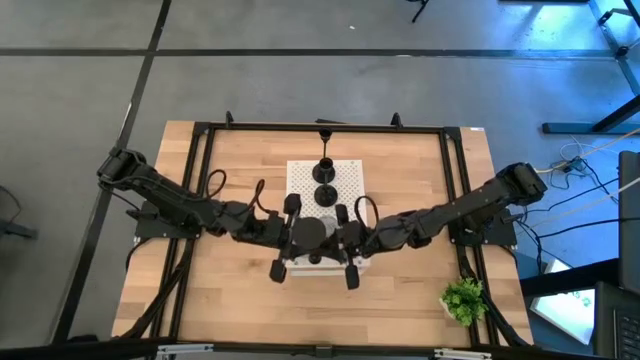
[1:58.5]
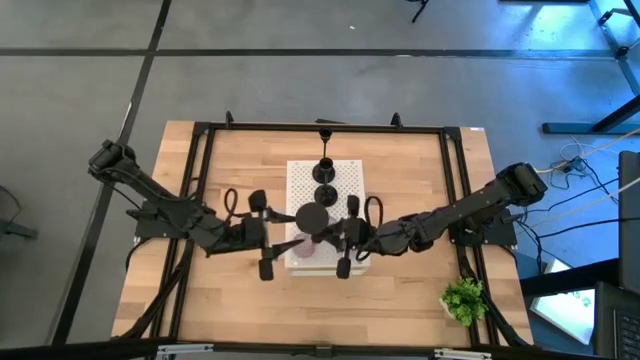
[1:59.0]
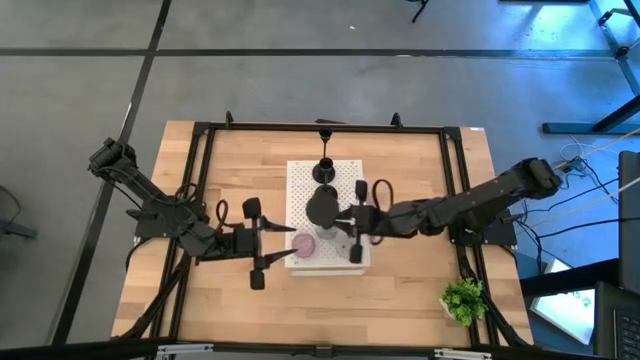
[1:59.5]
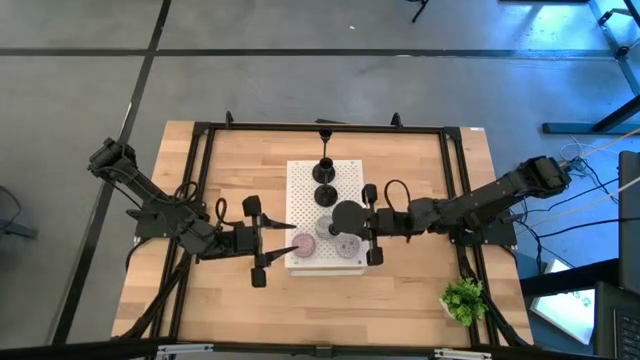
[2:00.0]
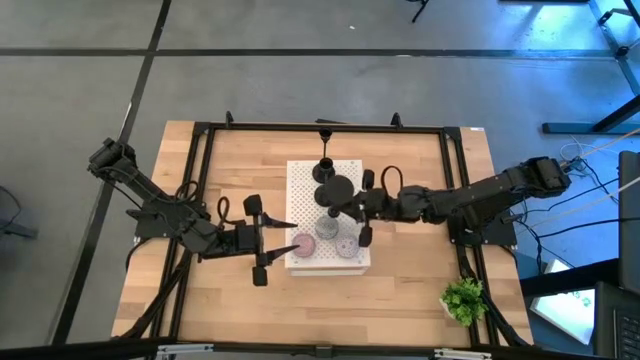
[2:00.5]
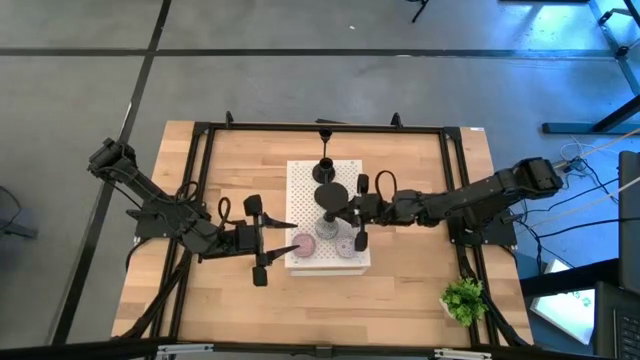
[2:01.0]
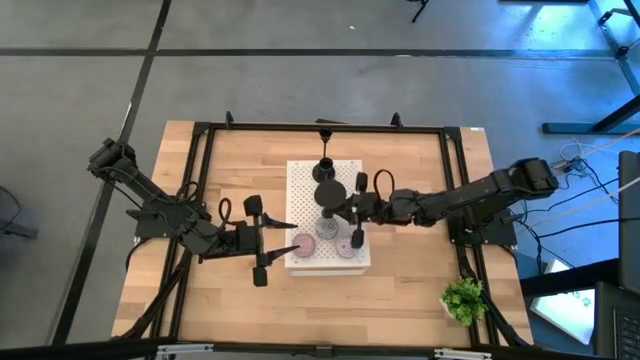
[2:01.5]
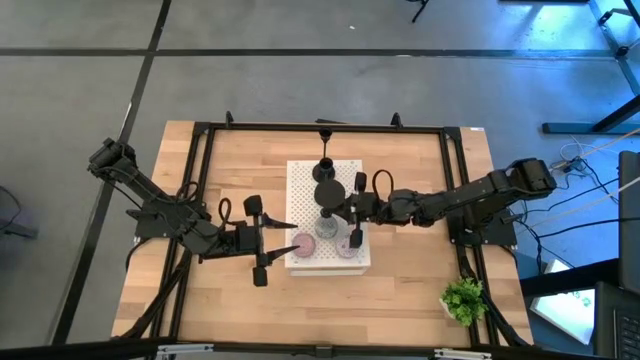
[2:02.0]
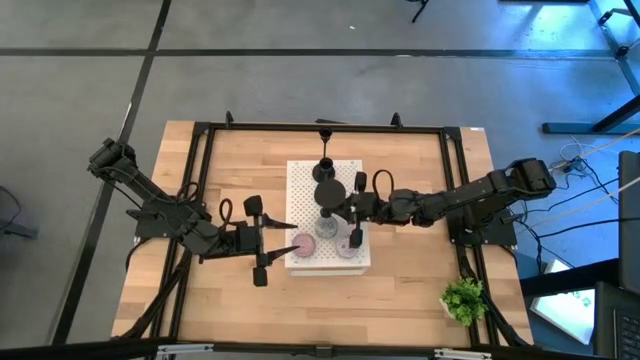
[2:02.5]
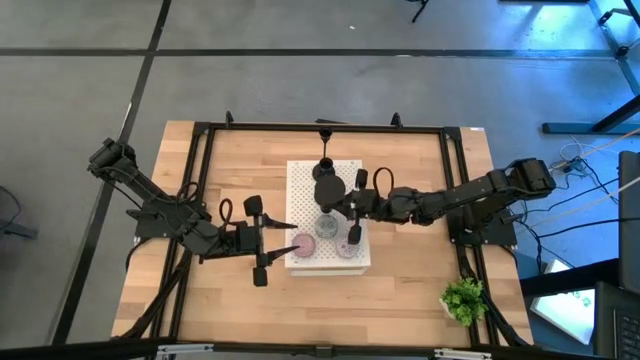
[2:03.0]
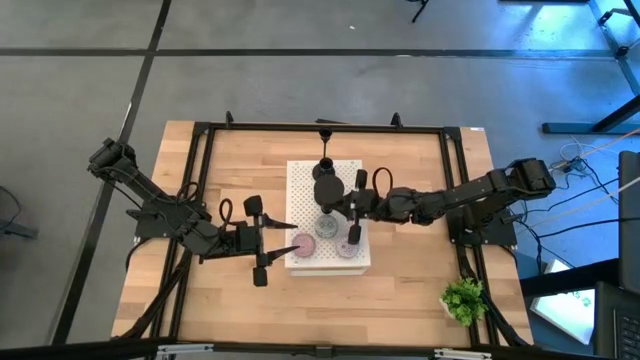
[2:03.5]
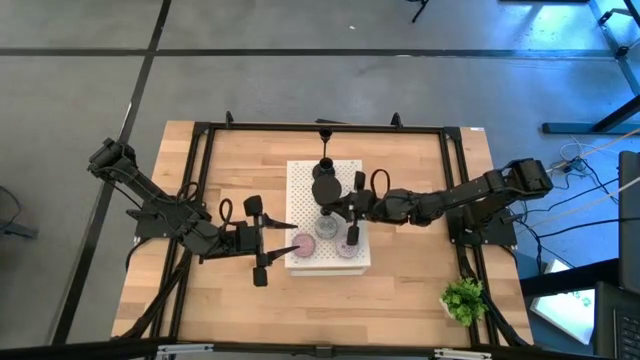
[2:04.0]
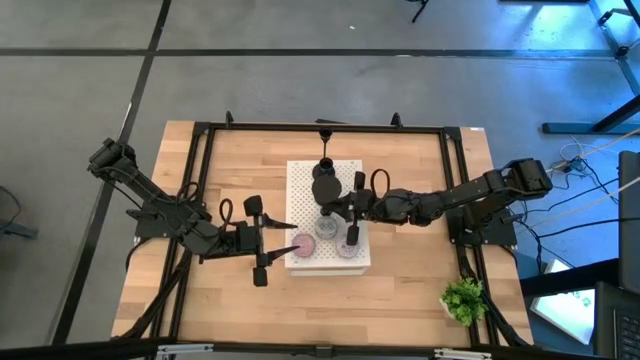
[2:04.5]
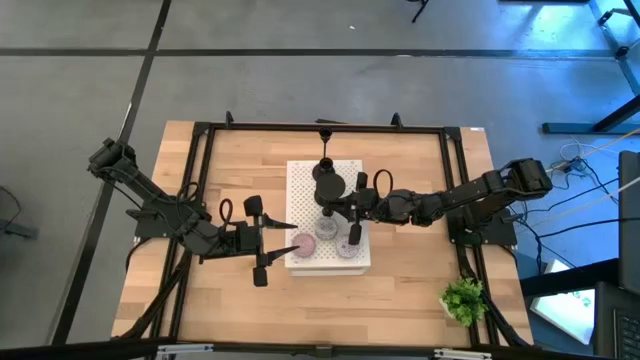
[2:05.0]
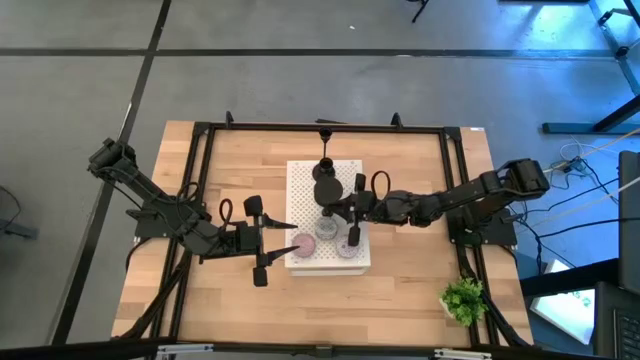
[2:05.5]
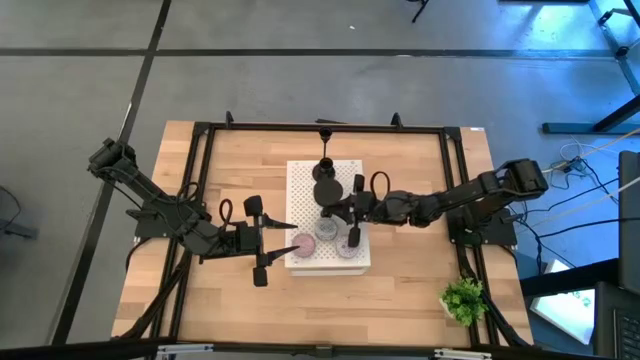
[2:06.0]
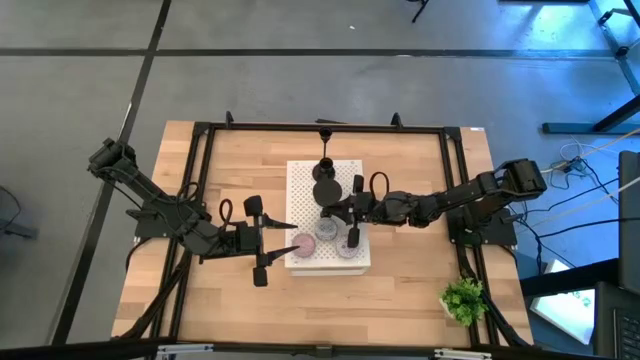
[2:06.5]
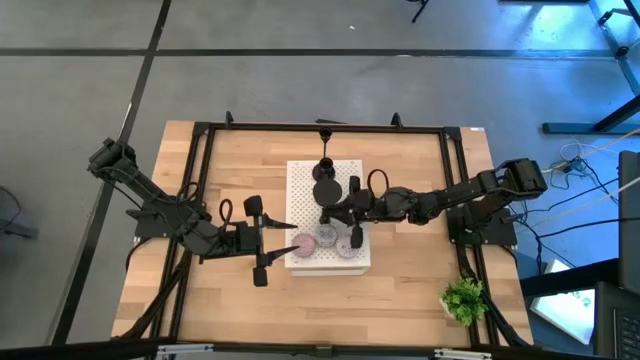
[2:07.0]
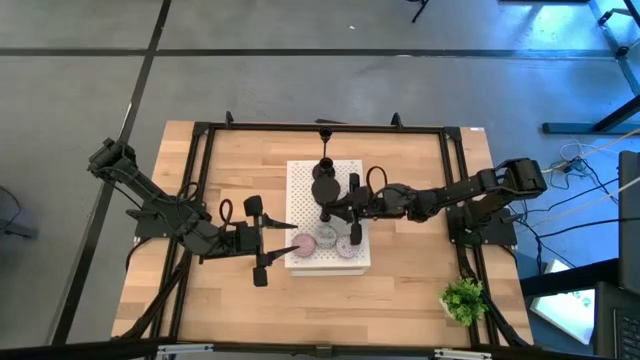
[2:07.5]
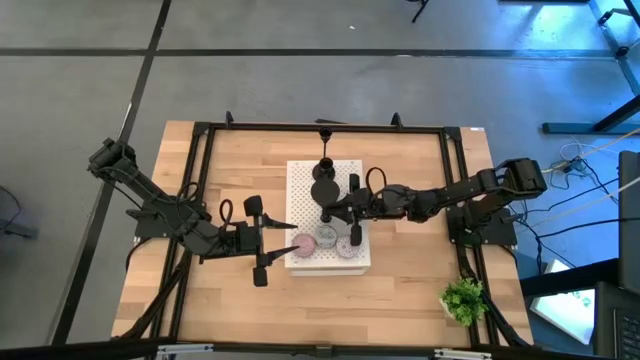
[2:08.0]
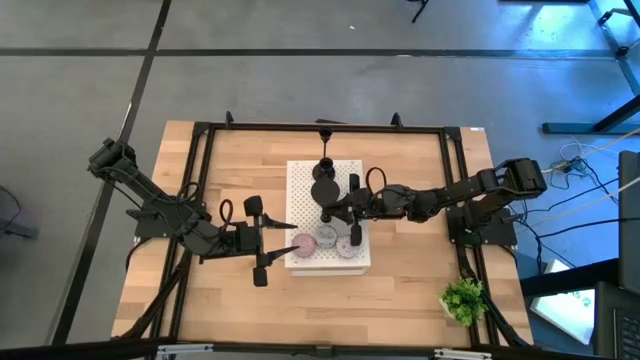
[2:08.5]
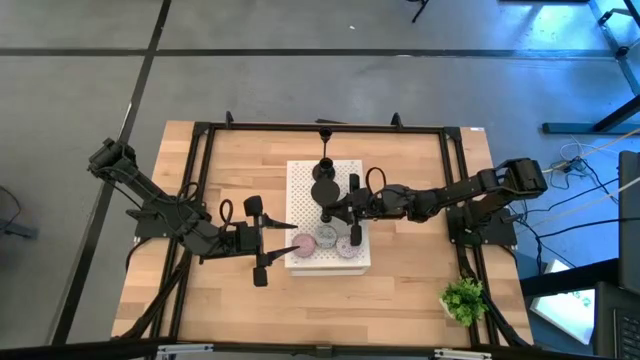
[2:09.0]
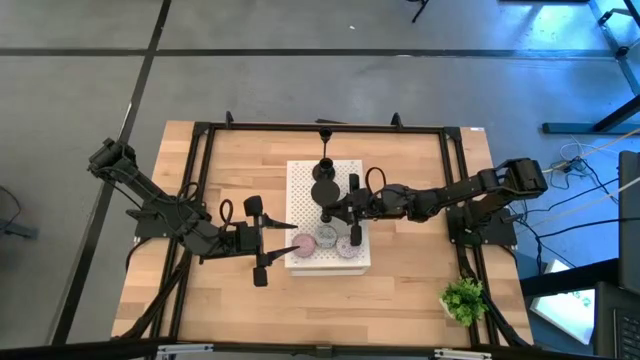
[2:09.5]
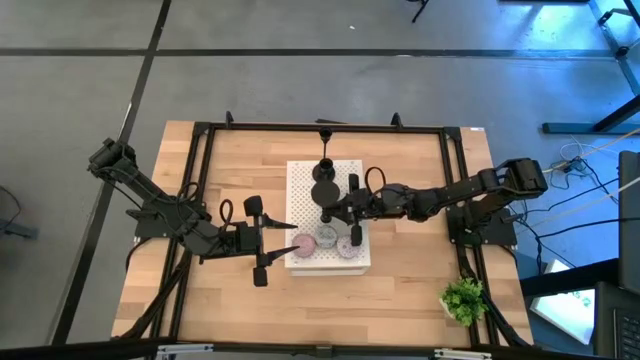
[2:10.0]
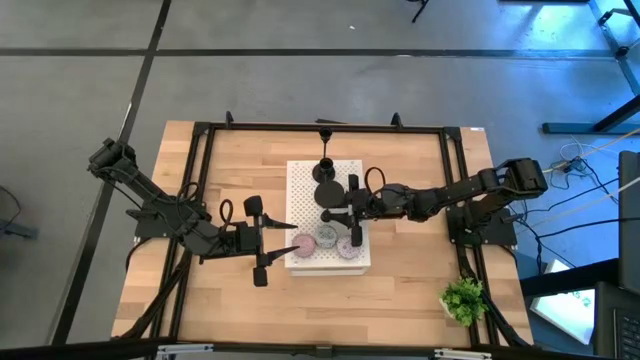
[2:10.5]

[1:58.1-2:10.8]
Task: Pick & Place candle stick holders
Put the black candle holder on the shelf

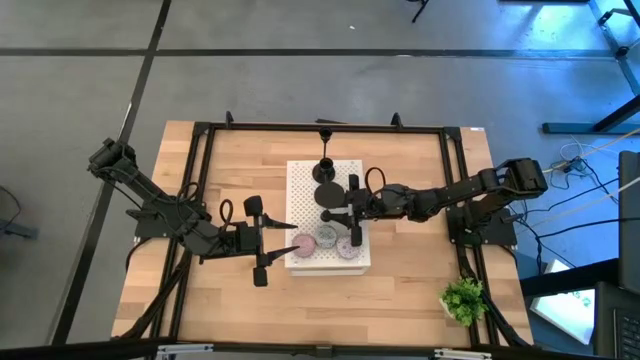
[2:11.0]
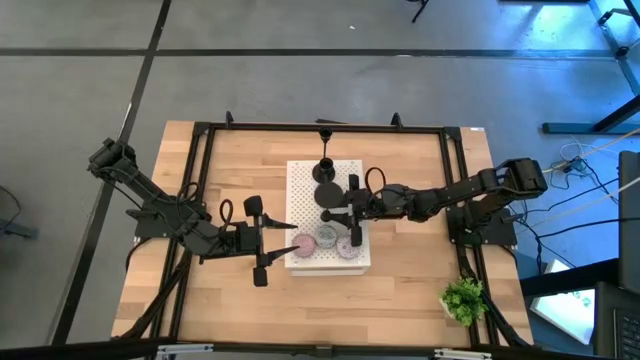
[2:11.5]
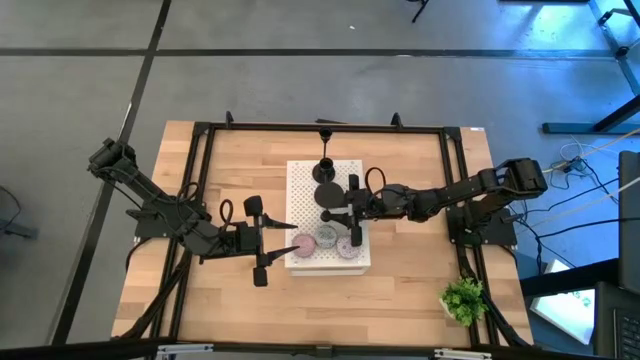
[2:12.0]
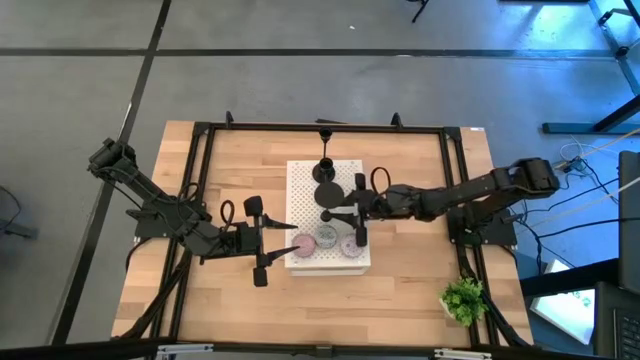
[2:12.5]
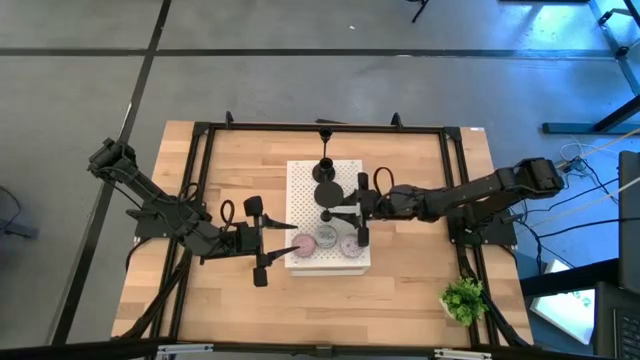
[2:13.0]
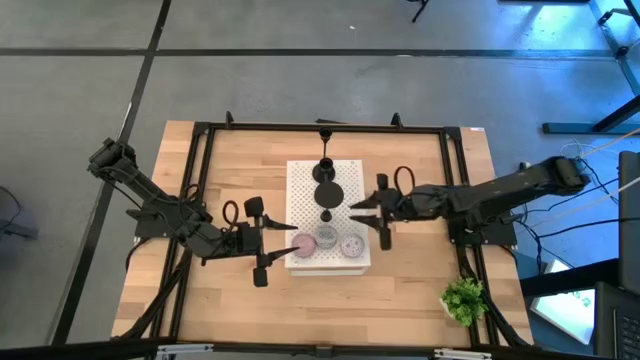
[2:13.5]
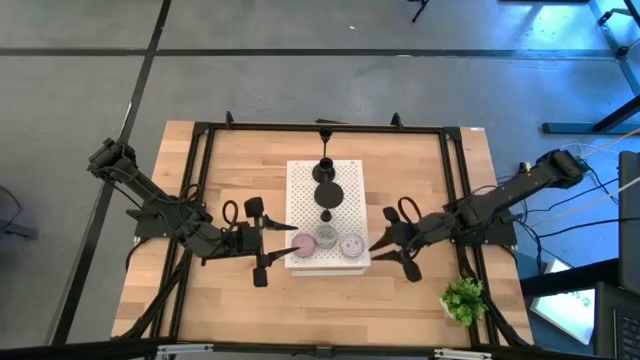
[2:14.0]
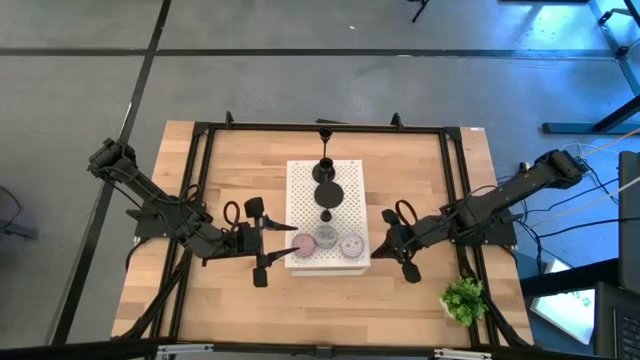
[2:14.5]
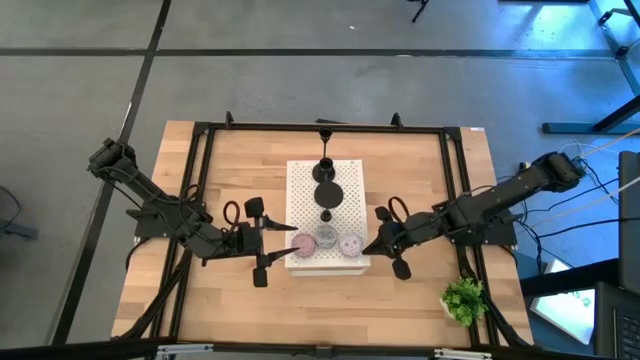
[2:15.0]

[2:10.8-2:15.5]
Adjust the scented candle

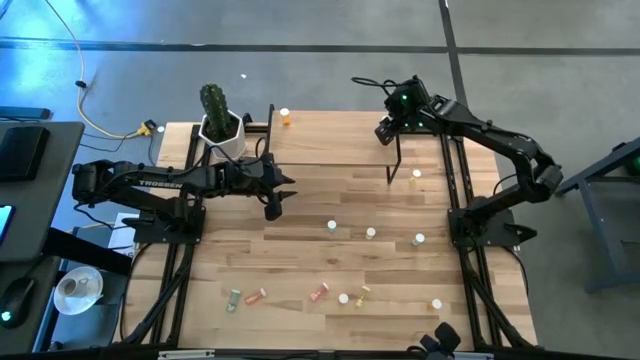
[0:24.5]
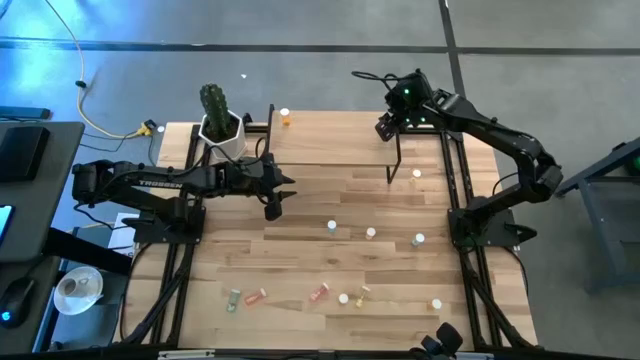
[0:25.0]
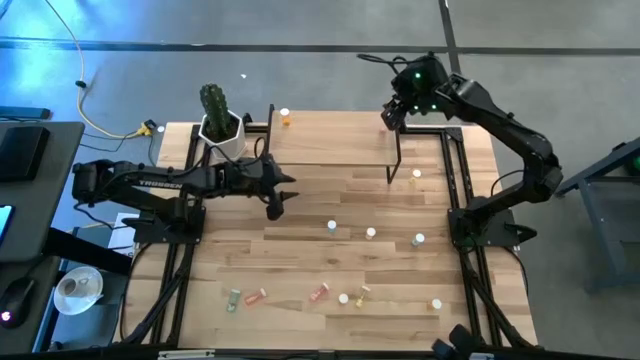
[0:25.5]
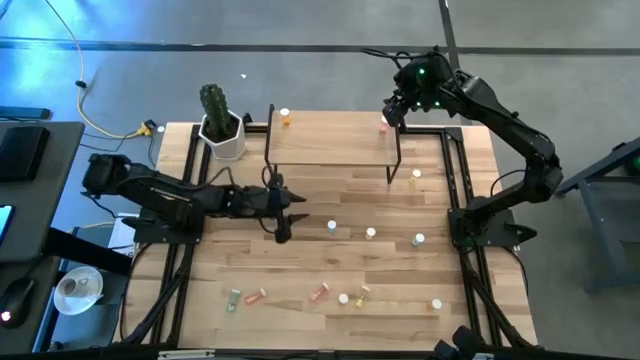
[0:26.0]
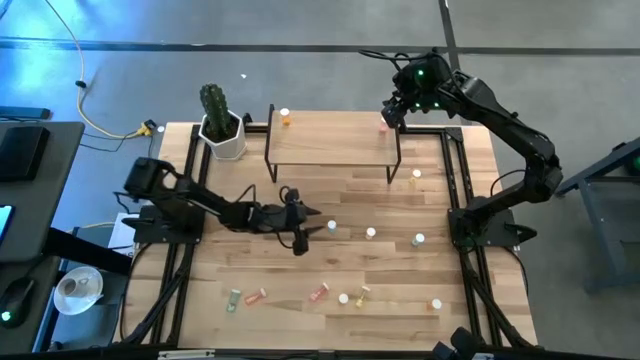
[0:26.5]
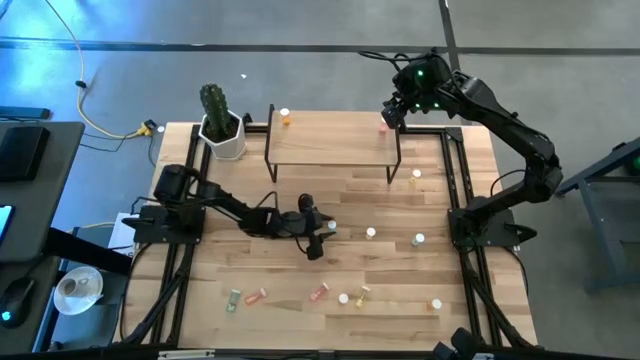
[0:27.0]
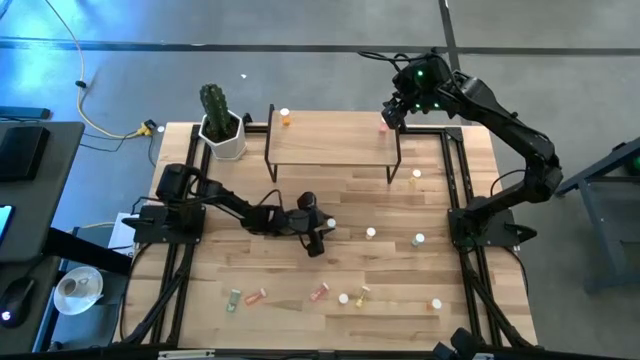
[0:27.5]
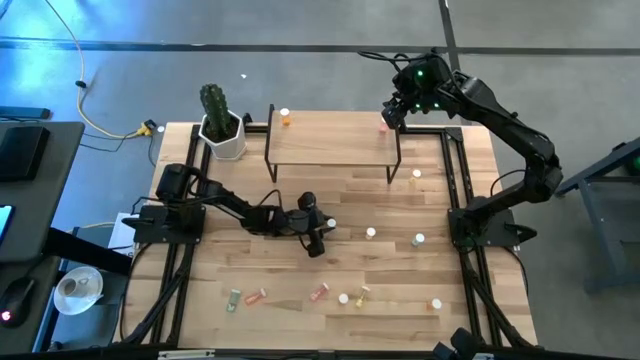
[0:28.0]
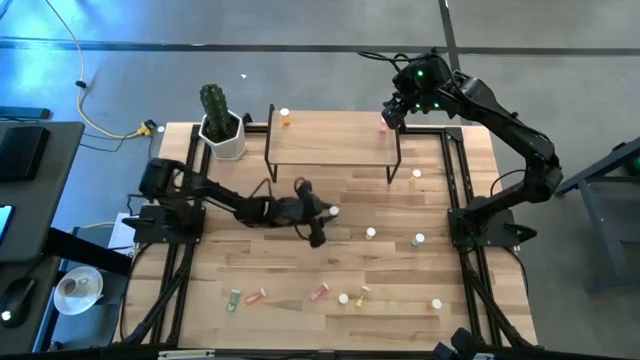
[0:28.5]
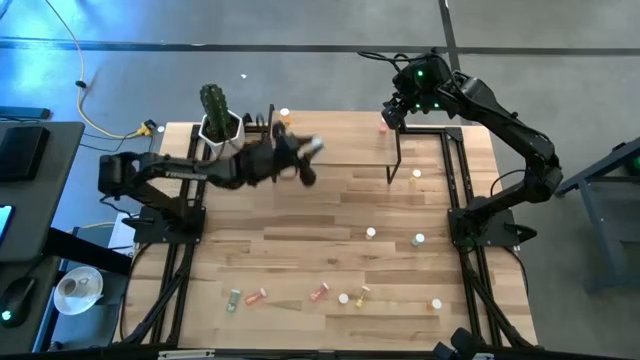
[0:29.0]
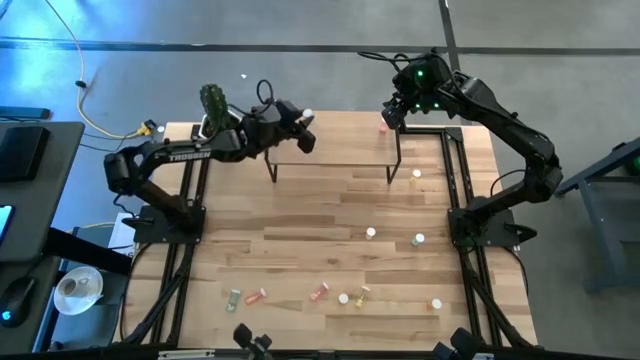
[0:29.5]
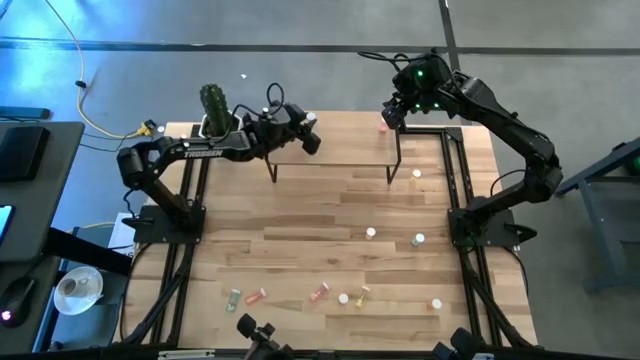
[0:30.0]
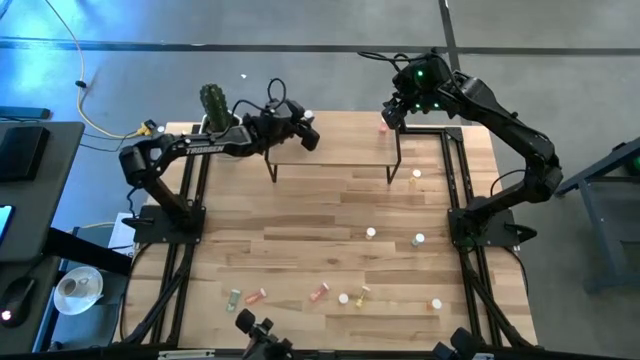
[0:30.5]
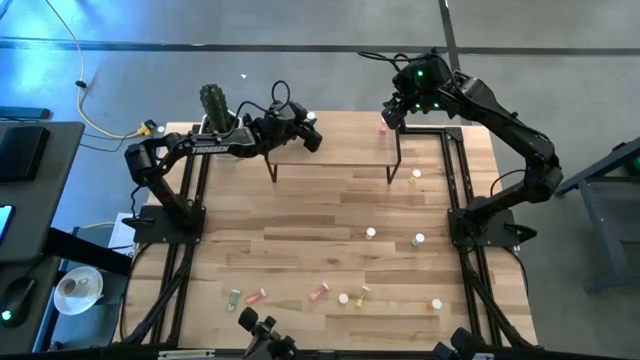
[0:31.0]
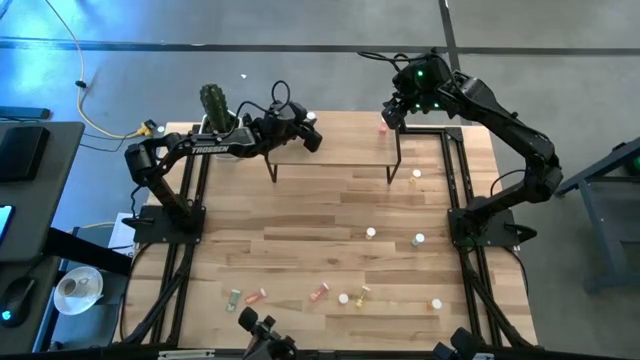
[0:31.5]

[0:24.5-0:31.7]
Task: Pick and place medicine bottles onto shelf by color
Put the middle blue pill bottle on the shelf
